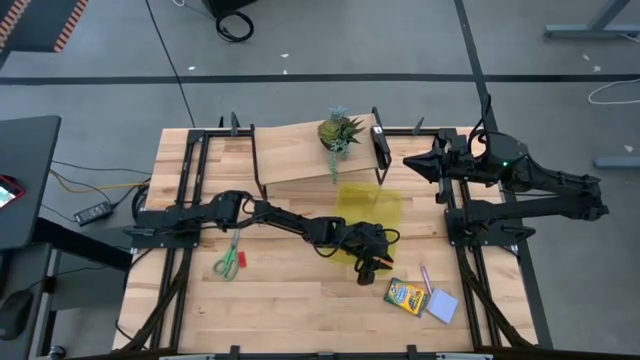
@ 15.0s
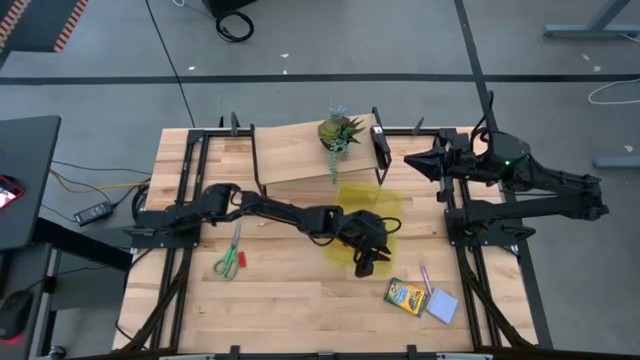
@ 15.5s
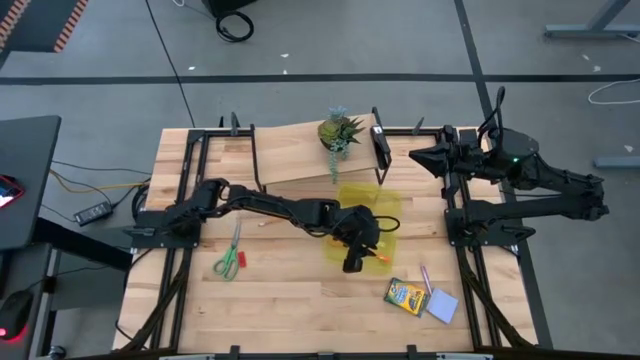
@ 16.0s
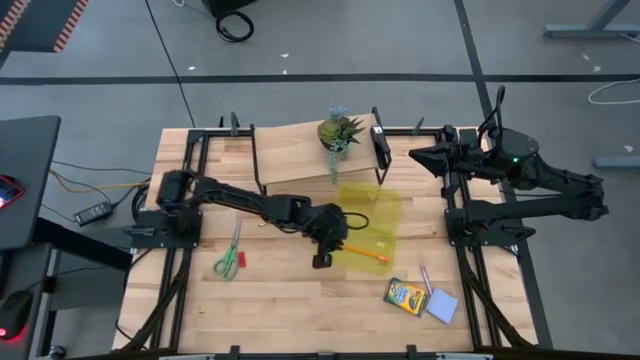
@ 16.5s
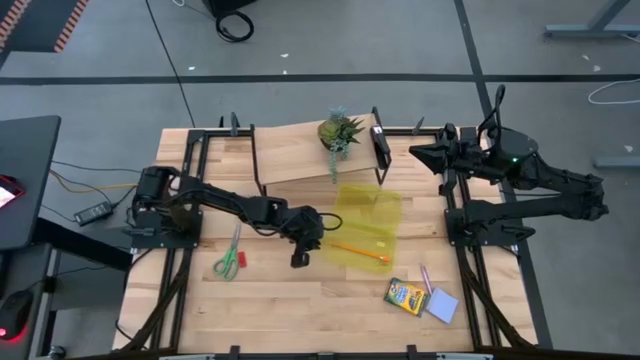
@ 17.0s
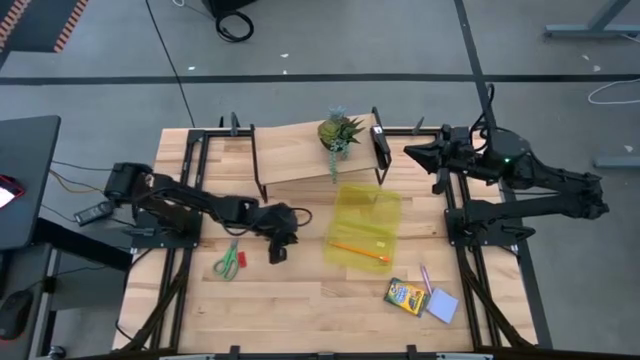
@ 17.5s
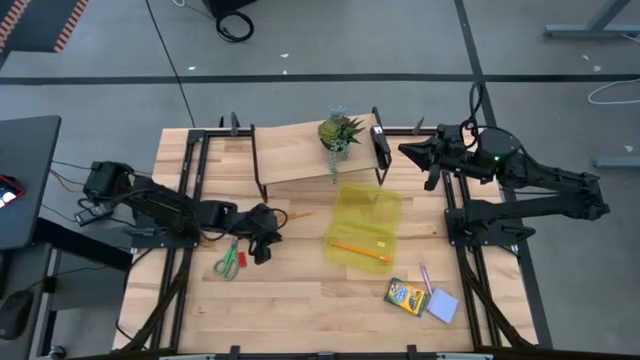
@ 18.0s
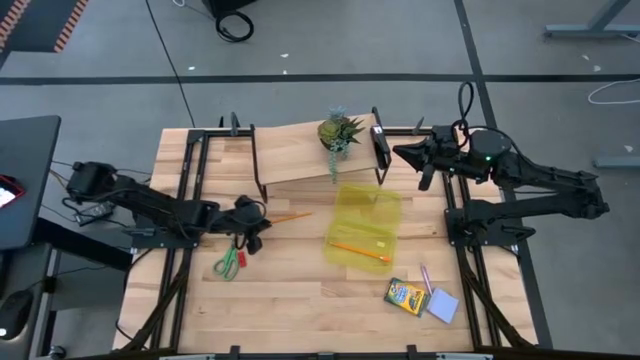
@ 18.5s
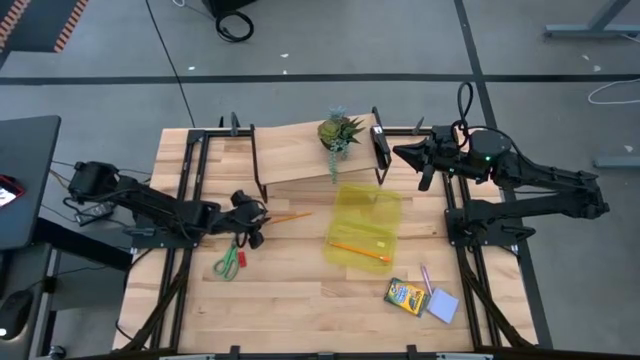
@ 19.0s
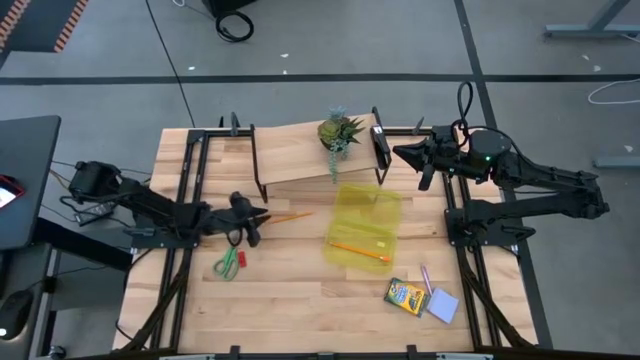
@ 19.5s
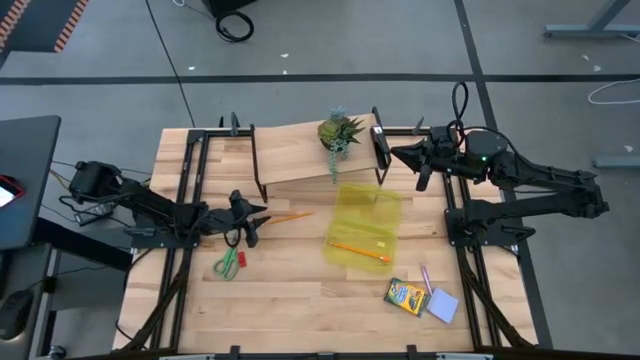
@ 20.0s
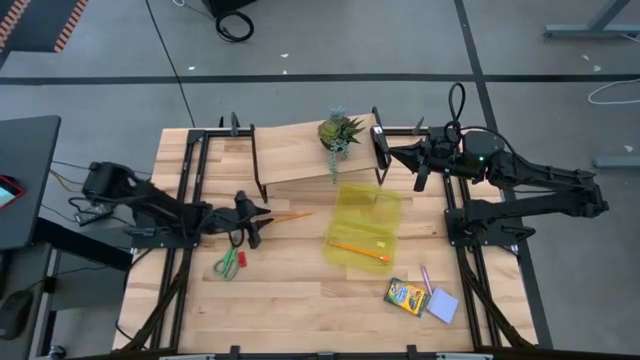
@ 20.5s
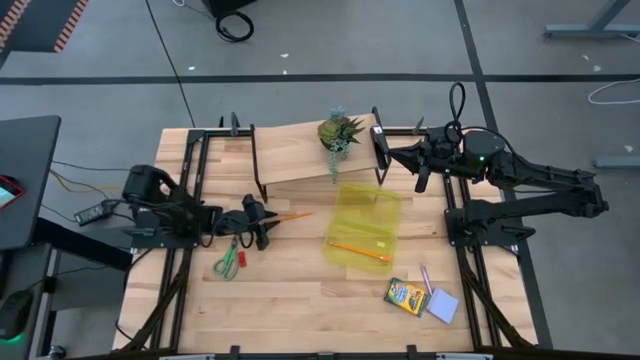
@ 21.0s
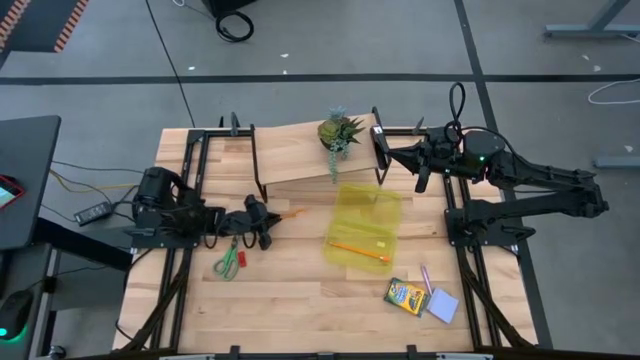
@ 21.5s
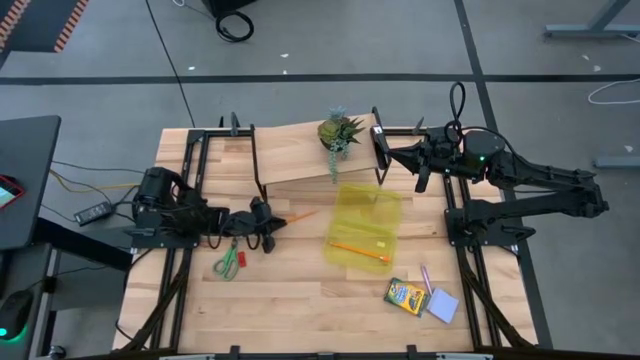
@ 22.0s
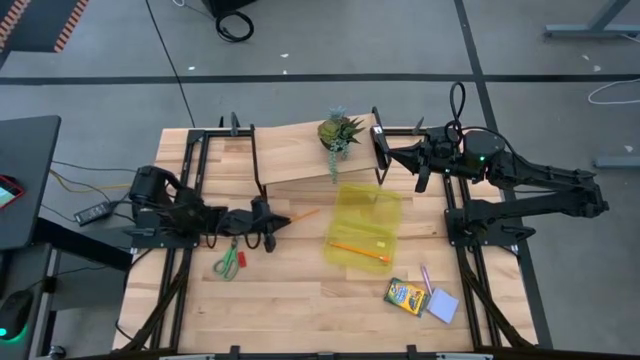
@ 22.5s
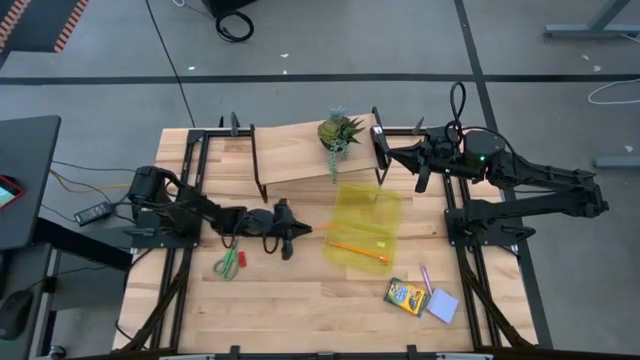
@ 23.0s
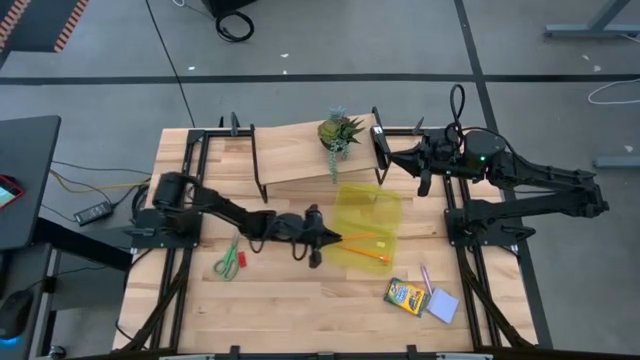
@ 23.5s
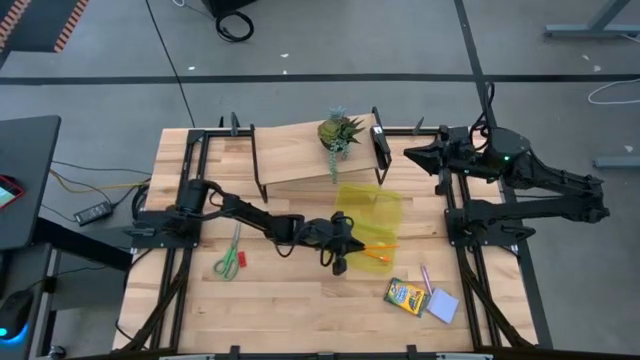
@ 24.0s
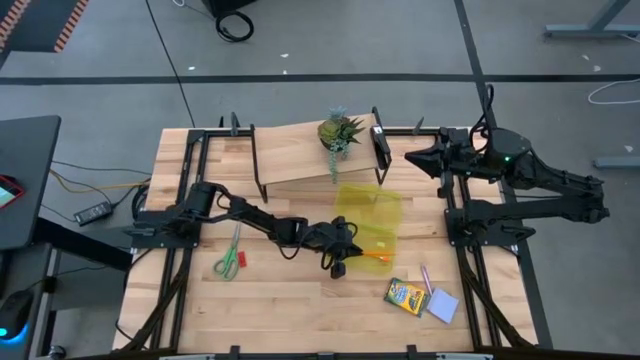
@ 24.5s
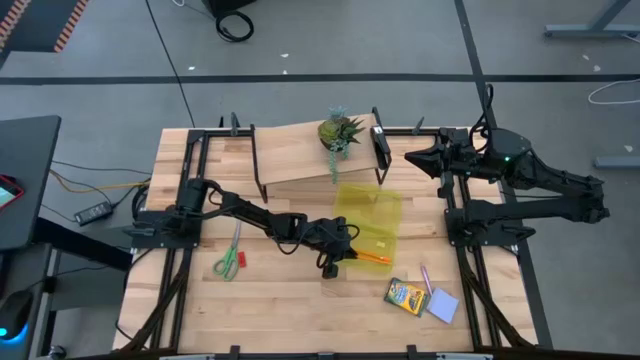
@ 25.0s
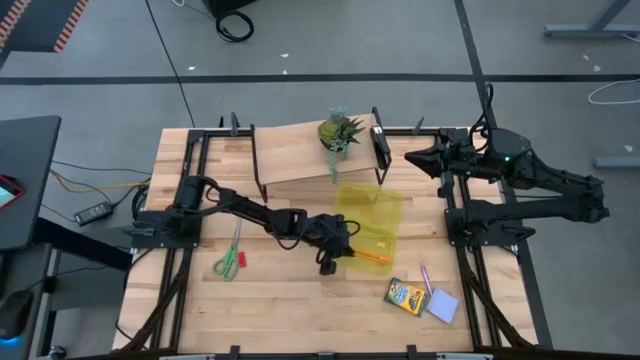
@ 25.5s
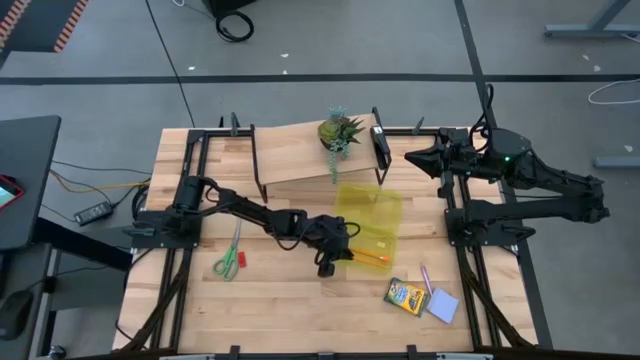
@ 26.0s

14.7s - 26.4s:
Task: Pack school essentials
Put the orange pencil into the yellow supply box

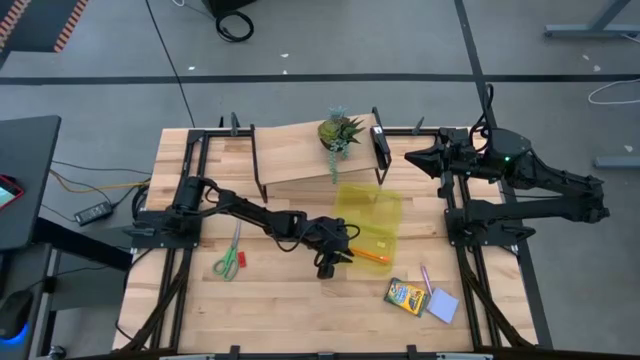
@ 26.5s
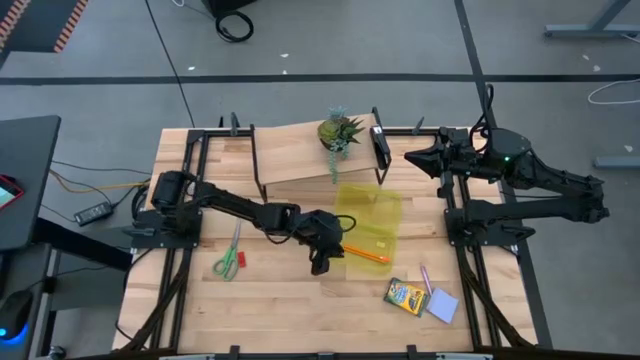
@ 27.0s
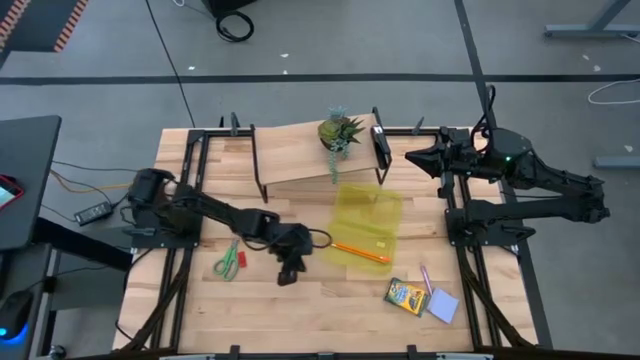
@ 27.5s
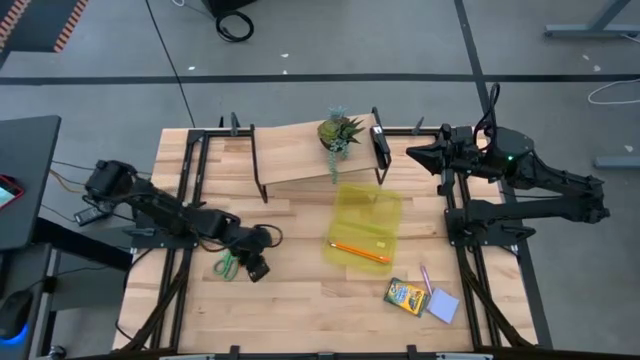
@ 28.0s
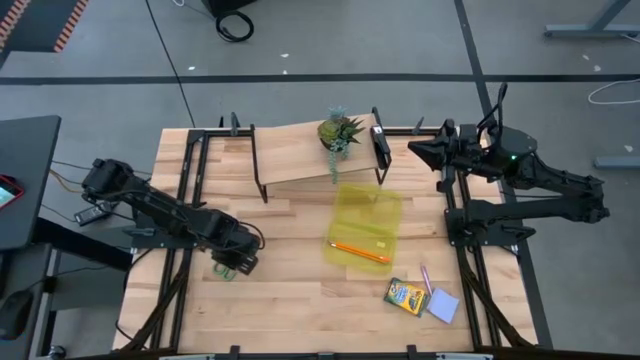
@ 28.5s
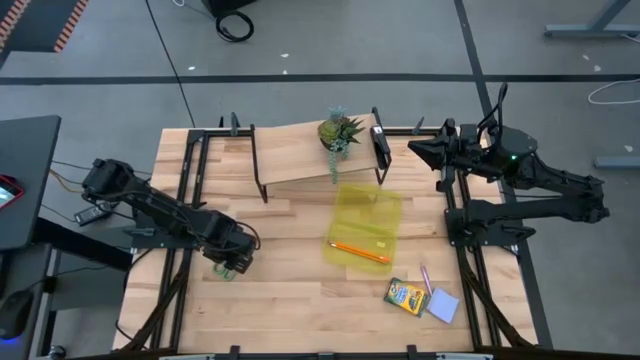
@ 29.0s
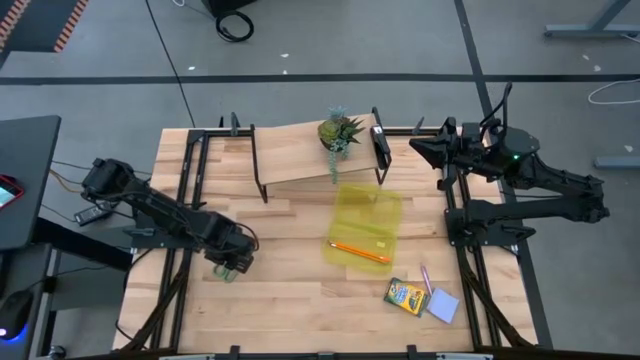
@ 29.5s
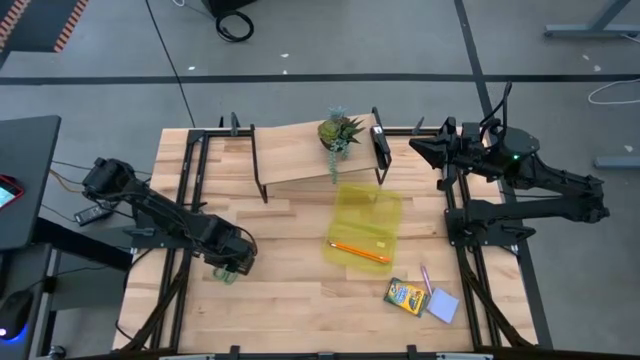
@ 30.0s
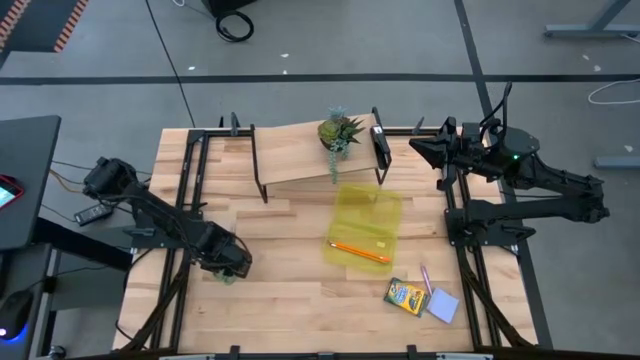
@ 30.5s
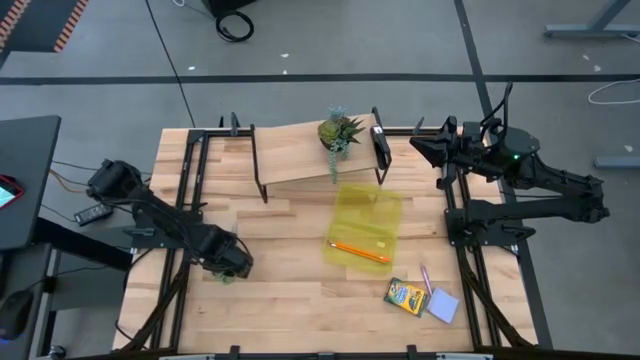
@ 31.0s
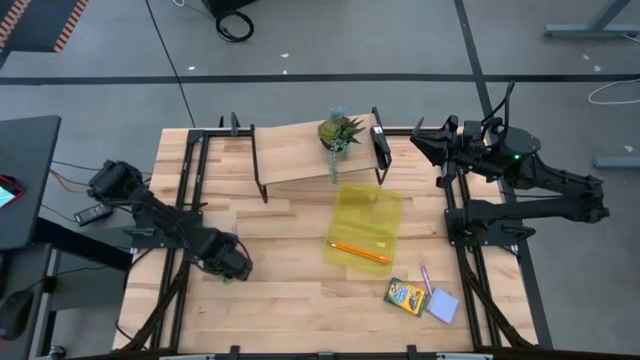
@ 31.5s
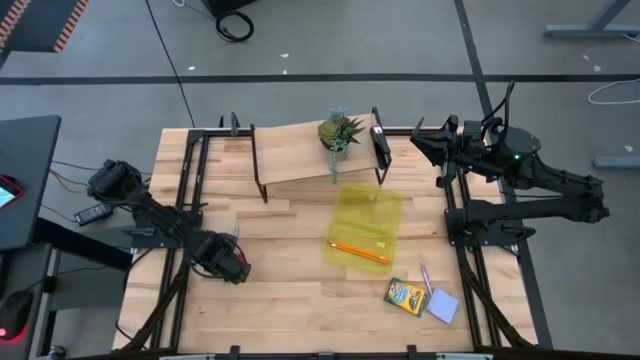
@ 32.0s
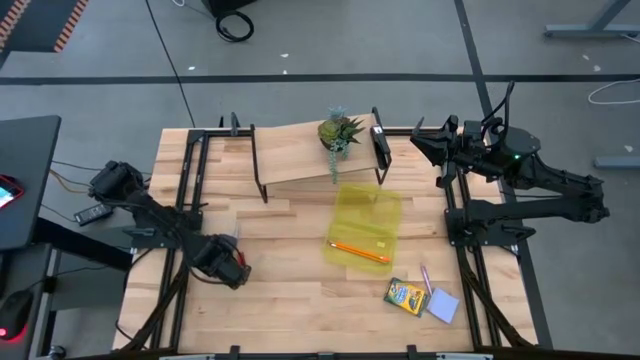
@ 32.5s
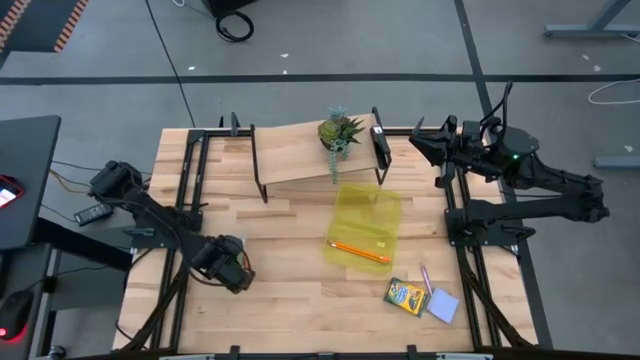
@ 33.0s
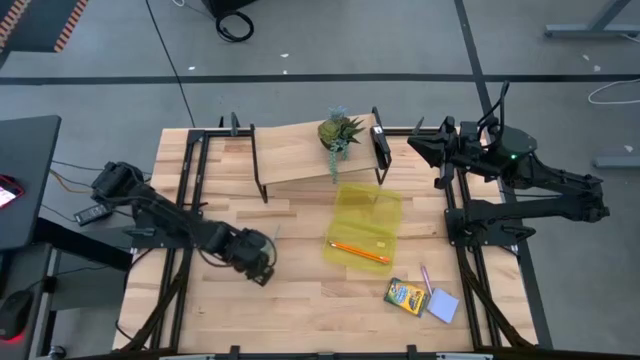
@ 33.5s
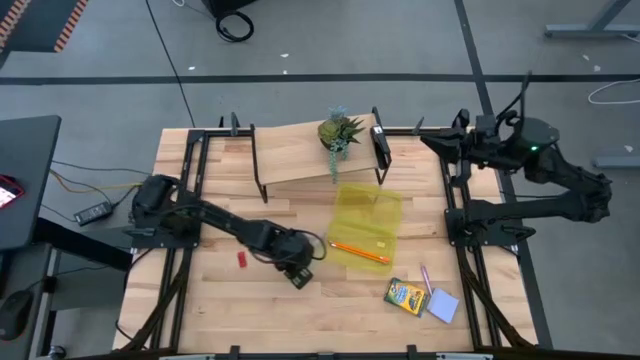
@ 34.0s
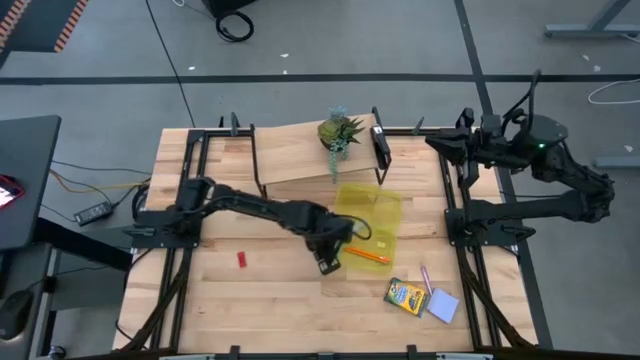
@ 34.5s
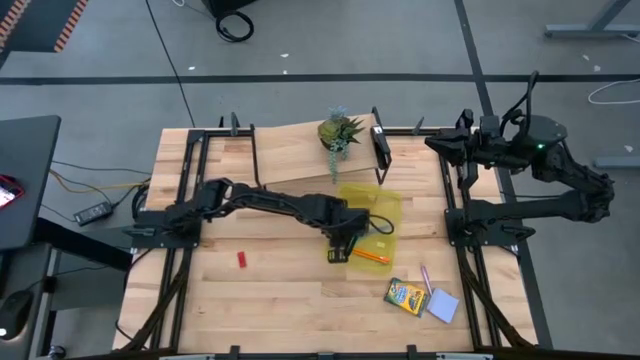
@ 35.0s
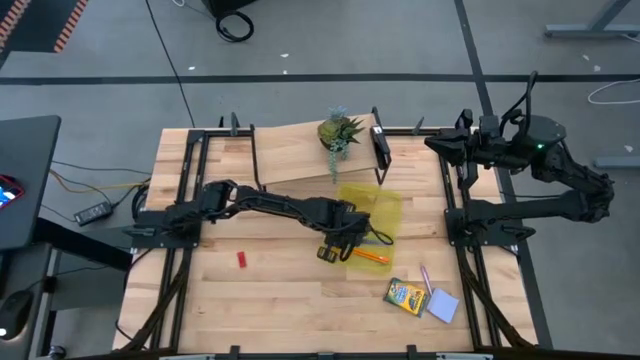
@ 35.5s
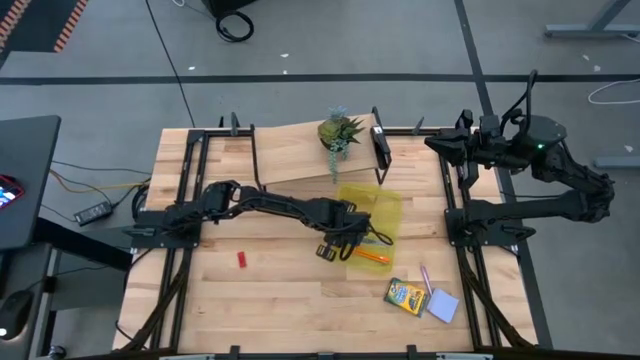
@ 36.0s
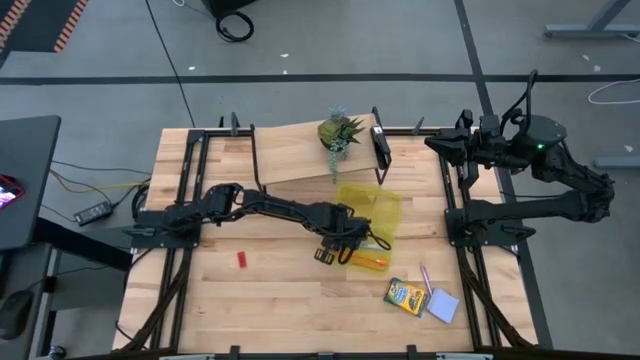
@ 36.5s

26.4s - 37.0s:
Put the green scissors into the yellow supply box
